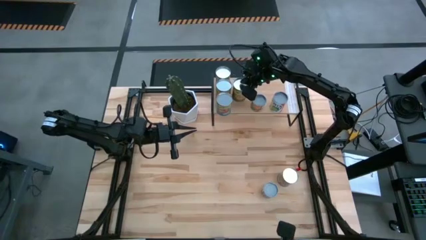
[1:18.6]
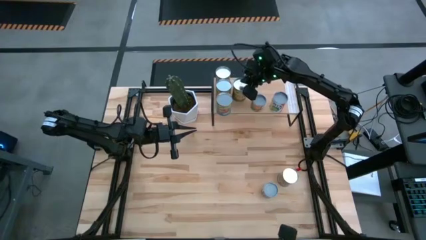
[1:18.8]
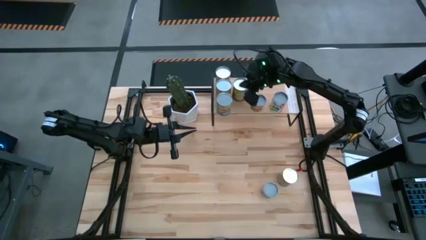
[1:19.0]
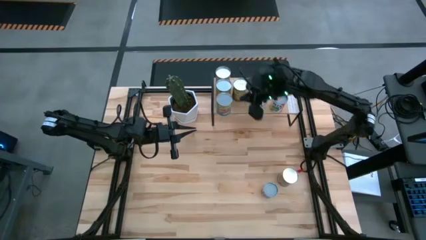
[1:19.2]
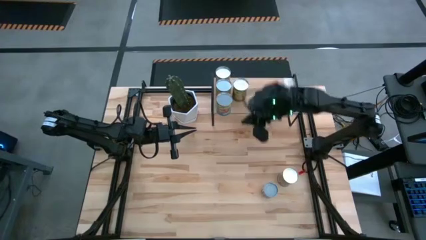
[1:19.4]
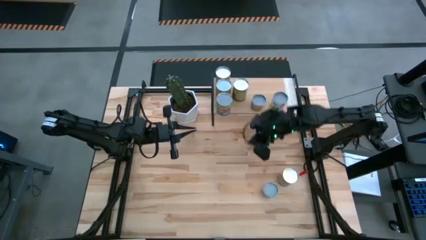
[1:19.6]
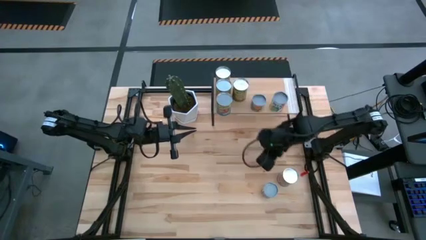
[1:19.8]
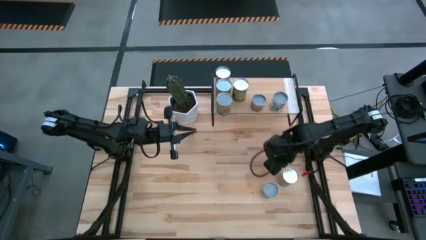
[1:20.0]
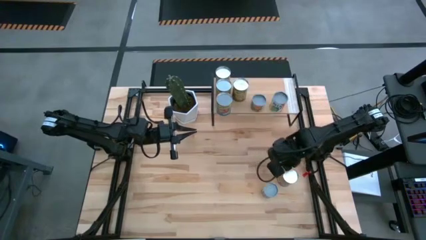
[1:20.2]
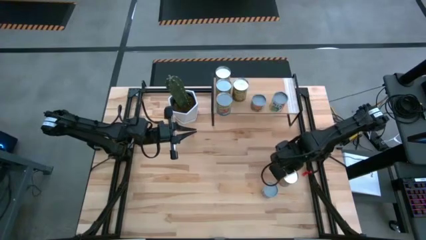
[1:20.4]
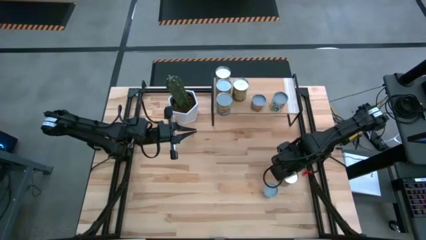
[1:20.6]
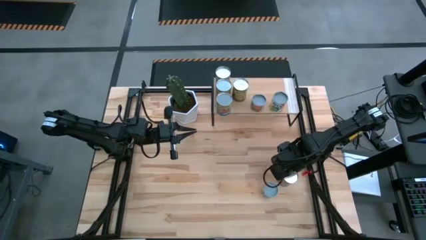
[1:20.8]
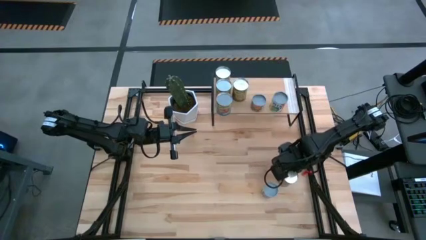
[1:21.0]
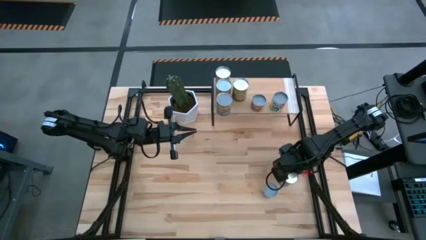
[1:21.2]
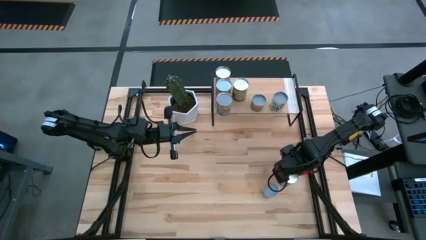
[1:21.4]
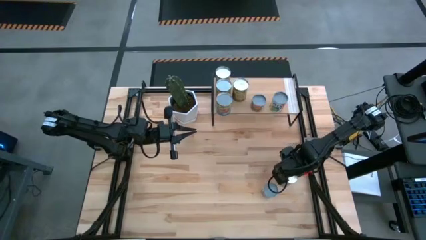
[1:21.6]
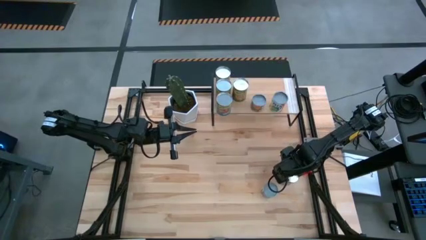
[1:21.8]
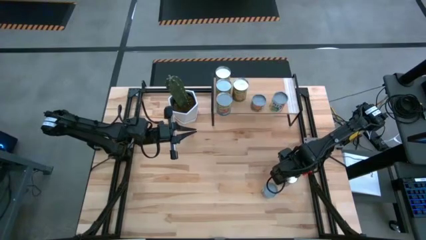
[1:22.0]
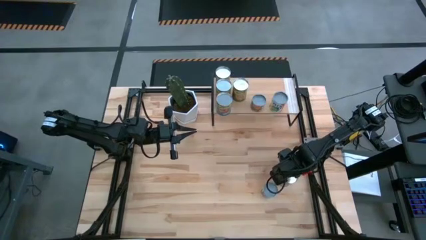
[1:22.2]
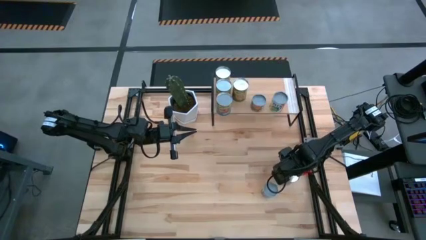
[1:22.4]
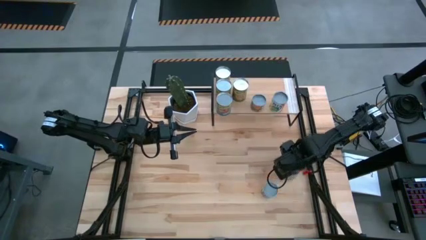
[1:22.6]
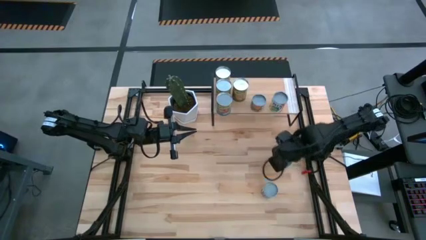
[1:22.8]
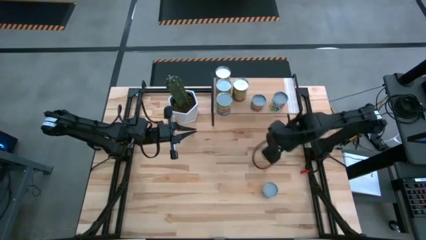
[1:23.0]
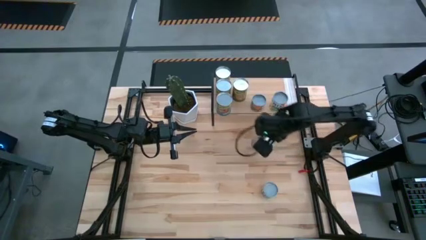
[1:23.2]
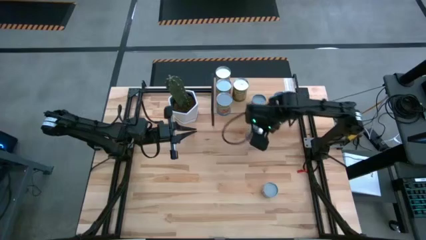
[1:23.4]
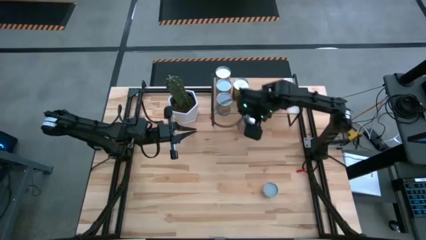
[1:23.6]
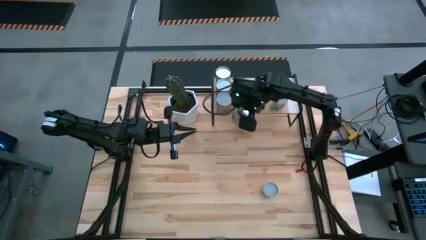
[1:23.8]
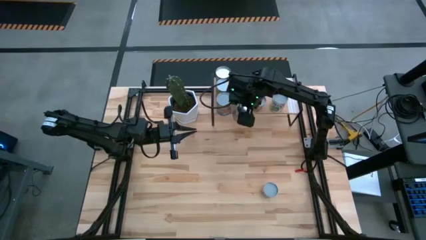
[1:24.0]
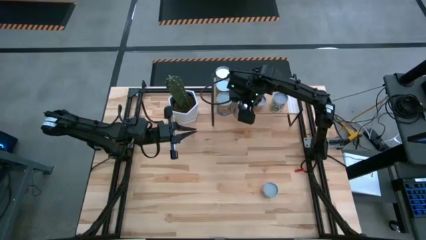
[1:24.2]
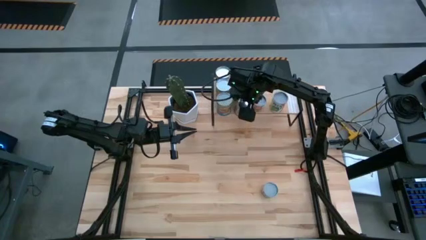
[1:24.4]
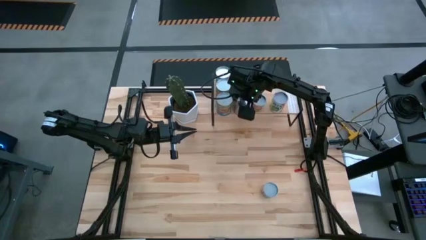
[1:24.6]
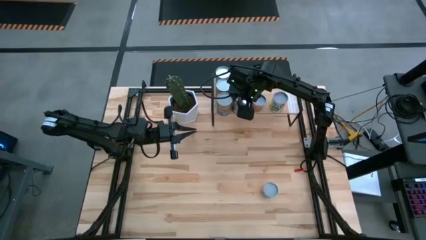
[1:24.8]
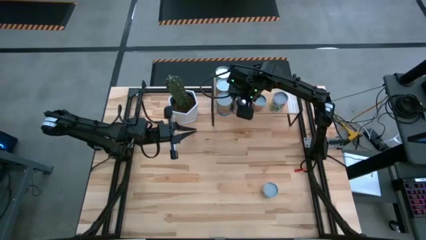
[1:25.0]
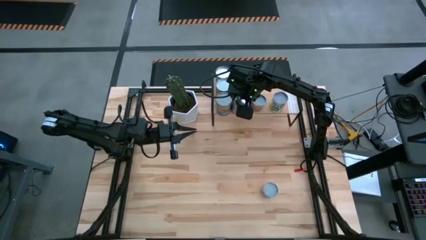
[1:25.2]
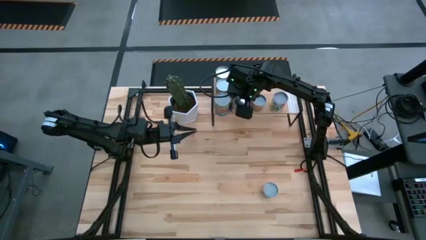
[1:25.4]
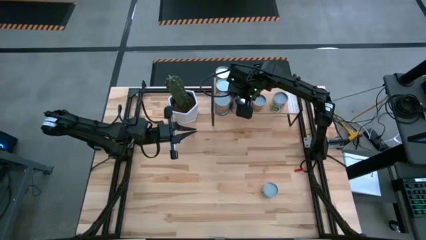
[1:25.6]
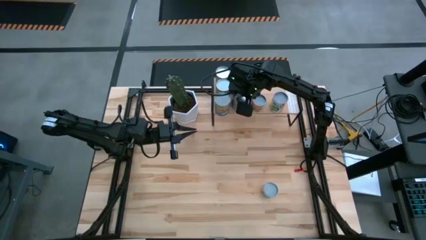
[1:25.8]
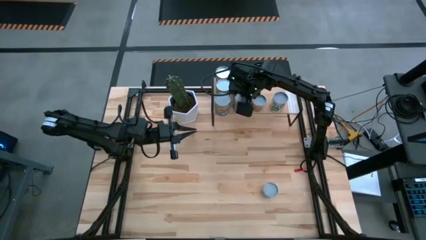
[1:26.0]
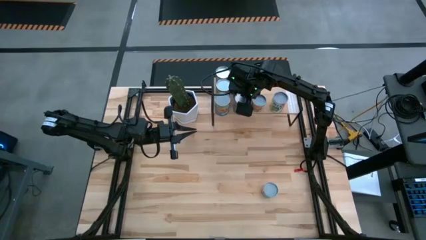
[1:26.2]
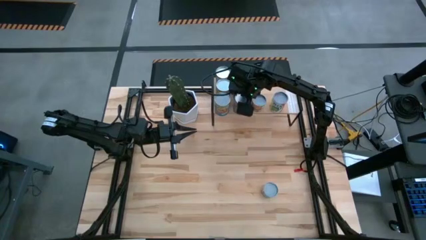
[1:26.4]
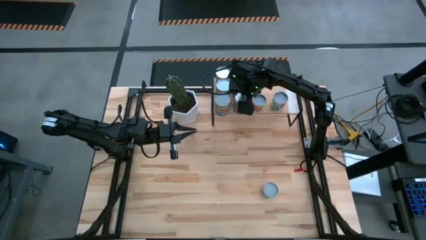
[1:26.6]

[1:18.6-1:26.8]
Task: Pick and place cans onto a shelf
Put the canned peaches on the shelf

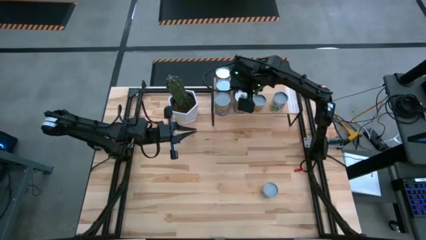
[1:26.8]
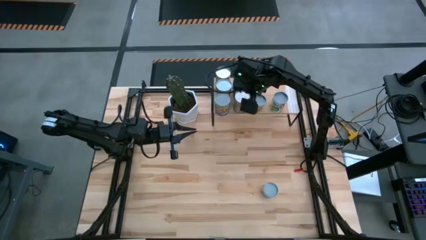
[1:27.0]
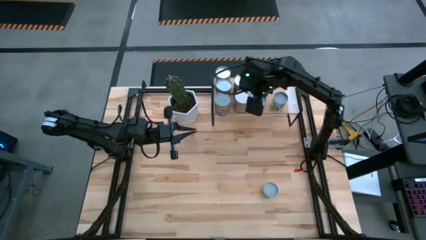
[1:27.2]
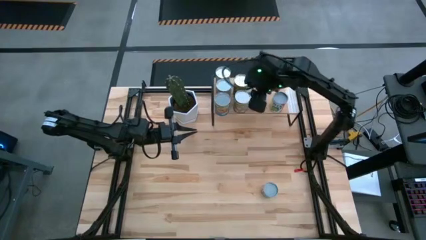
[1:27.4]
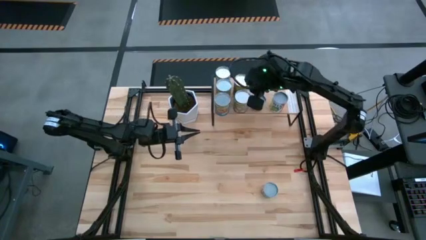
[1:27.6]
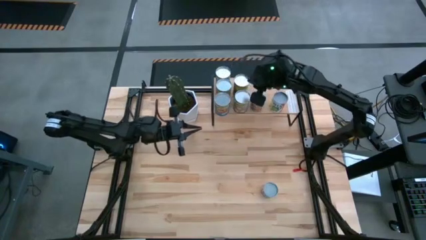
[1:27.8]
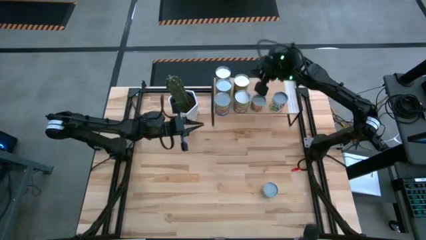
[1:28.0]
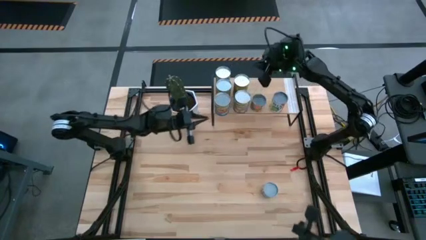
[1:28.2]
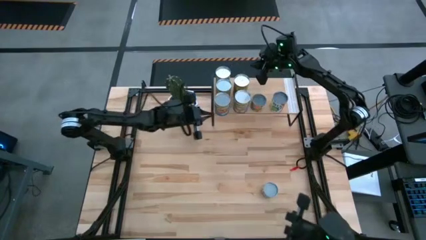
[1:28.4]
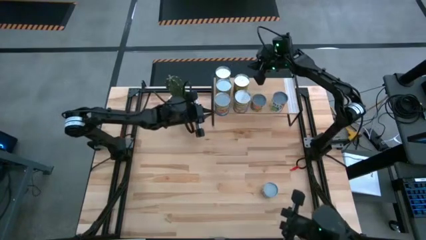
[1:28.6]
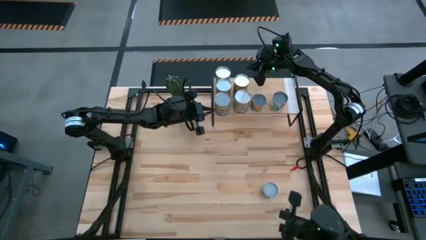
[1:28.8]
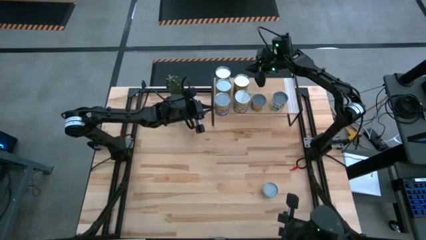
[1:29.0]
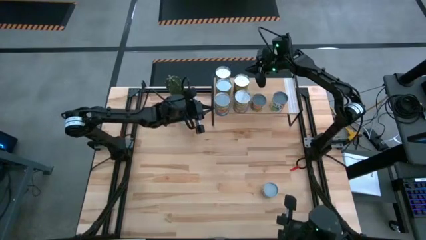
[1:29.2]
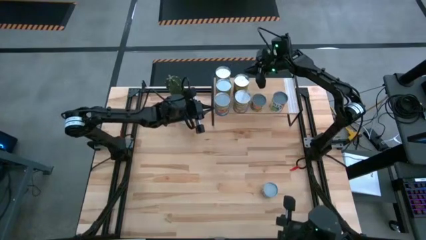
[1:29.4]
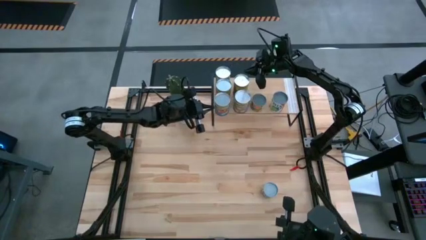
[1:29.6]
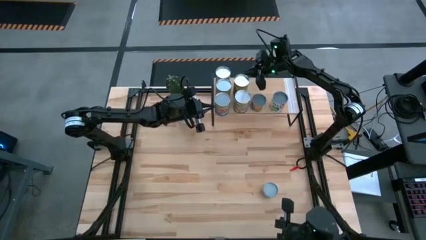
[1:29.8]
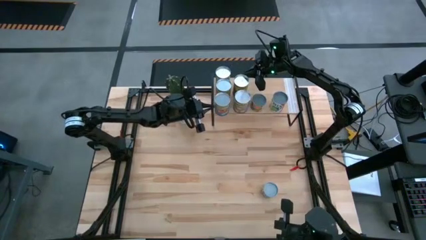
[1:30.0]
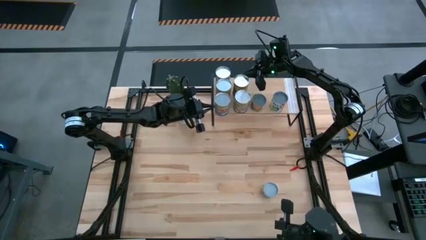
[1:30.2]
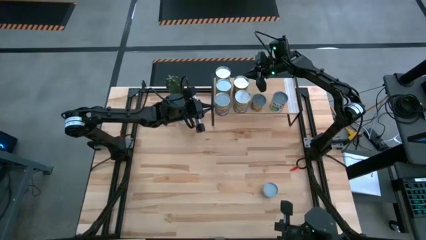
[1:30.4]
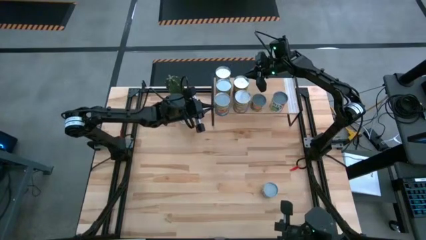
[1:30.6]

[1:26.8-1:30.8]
Adjust the canned oranges on the shelf

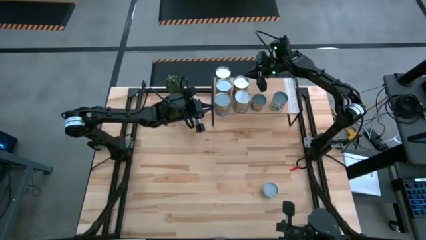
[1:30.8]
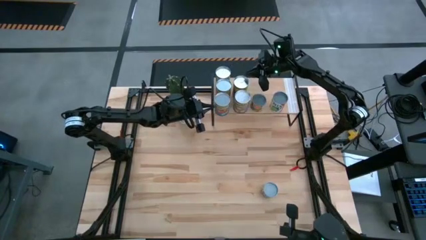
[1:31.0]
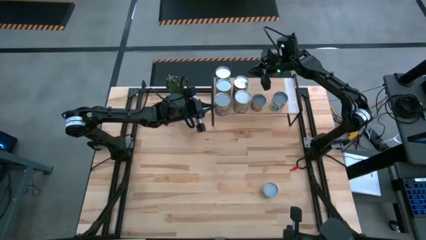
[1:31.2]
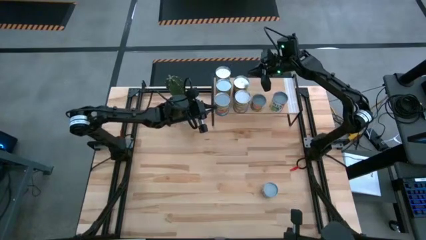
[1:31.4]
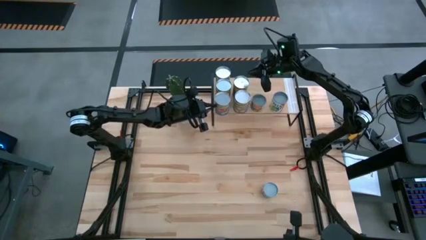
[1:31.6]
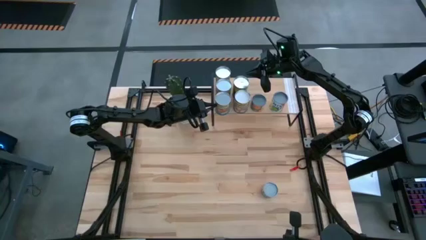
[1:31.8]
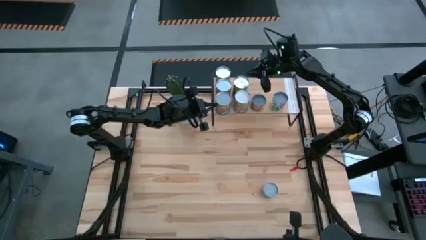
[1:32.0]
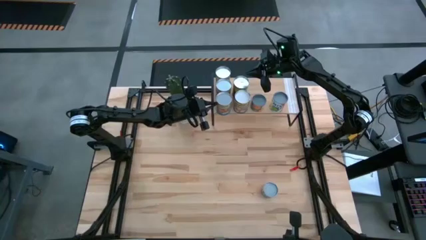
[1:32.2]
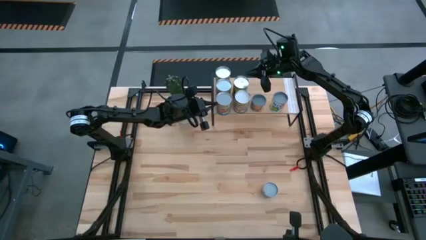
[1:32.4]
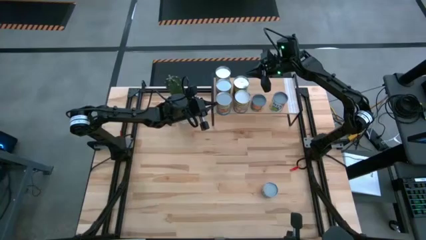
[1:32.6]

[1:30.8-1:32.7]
Adjust the canned tomatoes on the shelf
